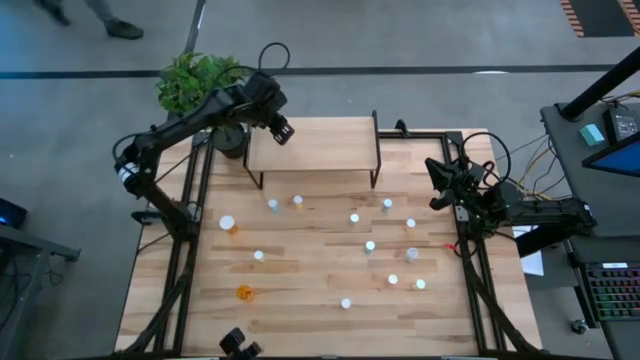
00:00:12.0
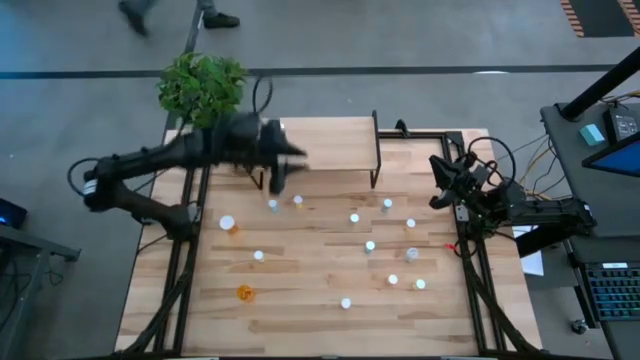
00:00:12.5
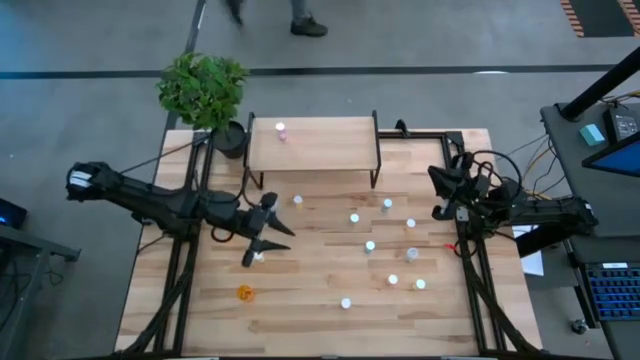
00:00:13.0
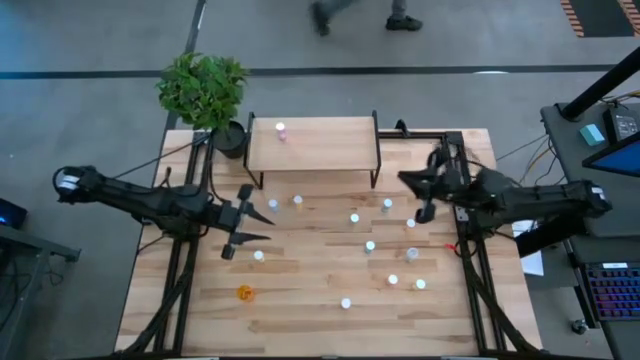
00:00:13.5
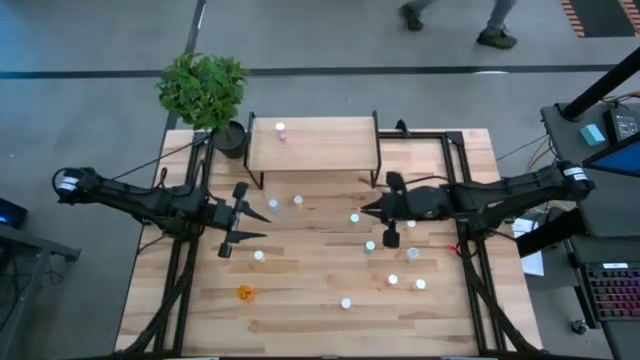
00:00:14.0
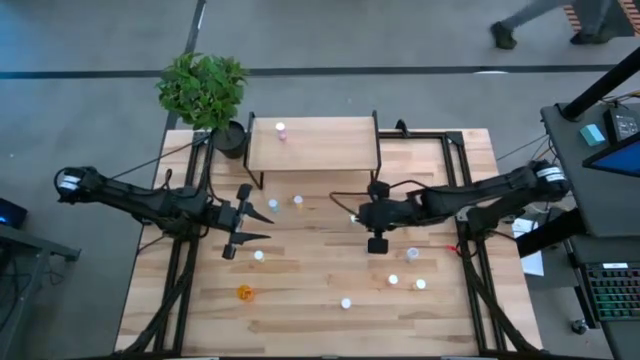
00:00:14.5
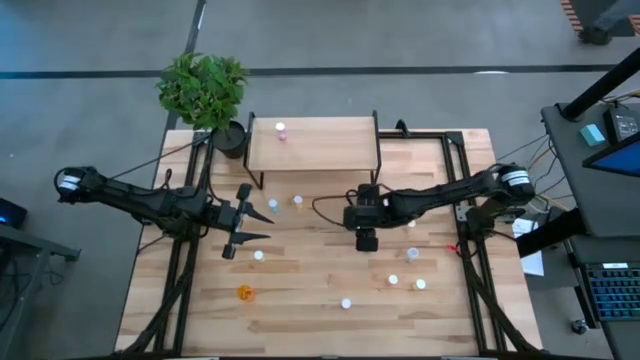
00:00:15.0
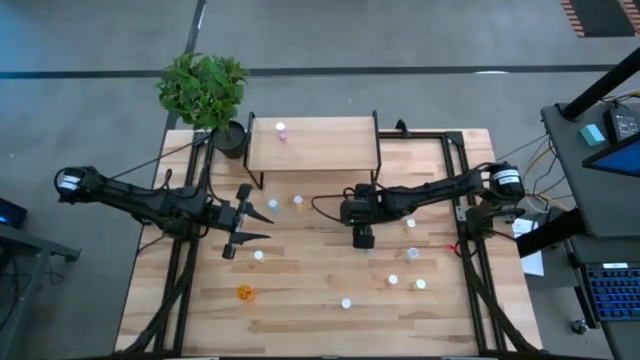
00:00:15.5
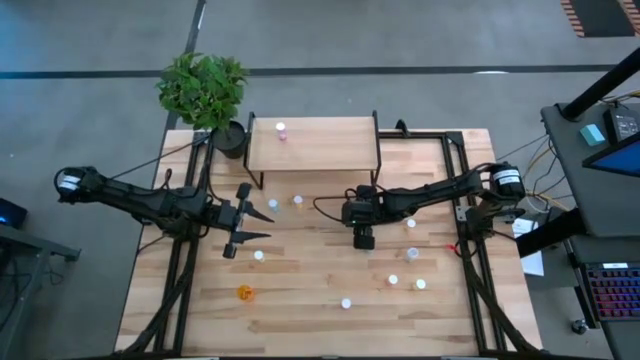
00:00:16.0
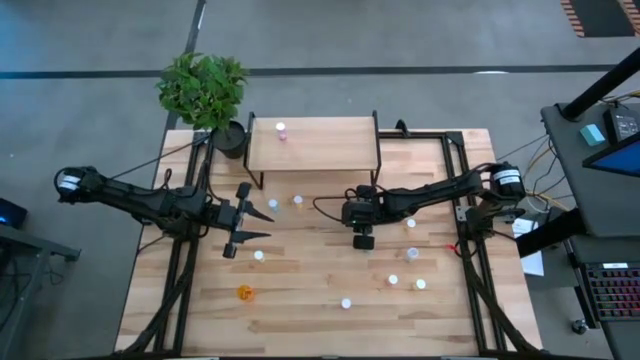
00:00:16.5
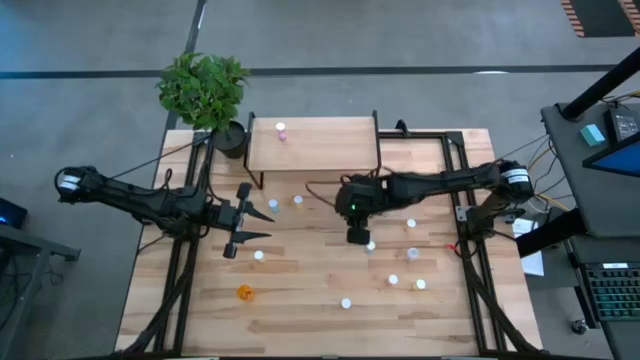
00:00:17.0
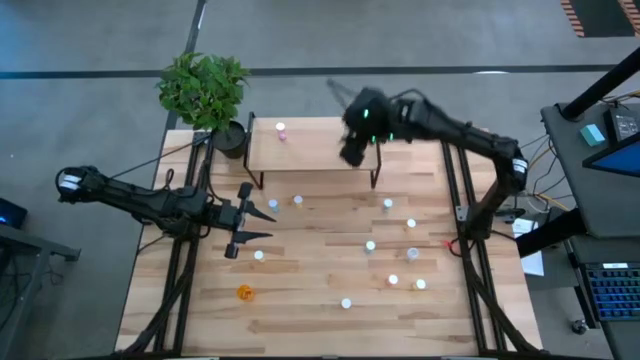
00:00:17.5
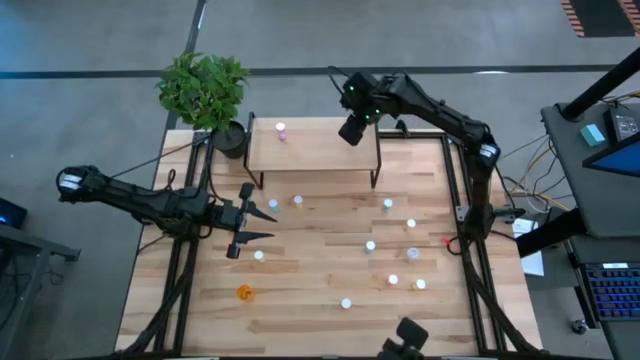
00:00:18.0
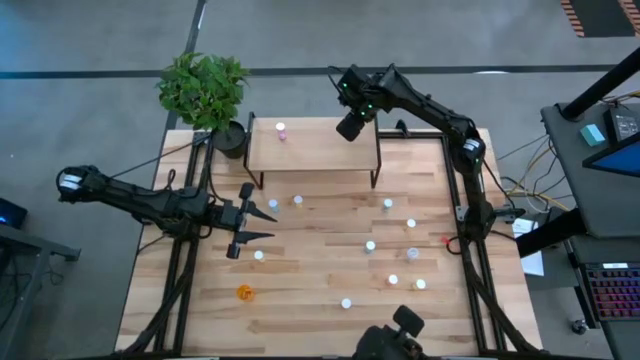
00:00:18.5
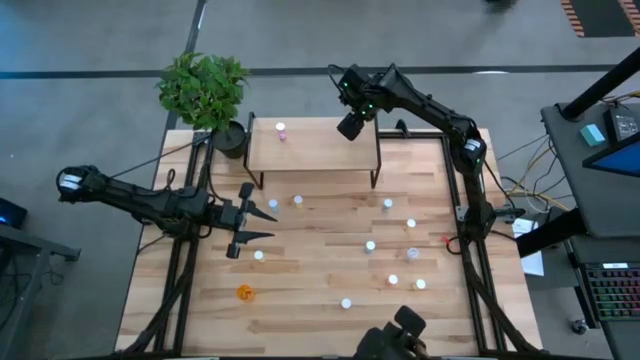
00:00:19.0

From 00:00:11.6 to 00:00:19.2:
Task: Pick and place medicine bottles onto shelf by color
Put the yellow pill bottle on the shelf

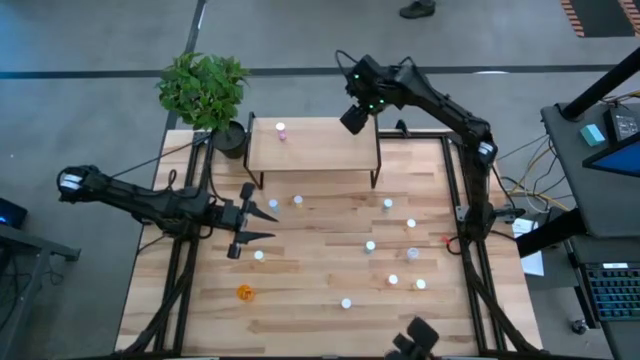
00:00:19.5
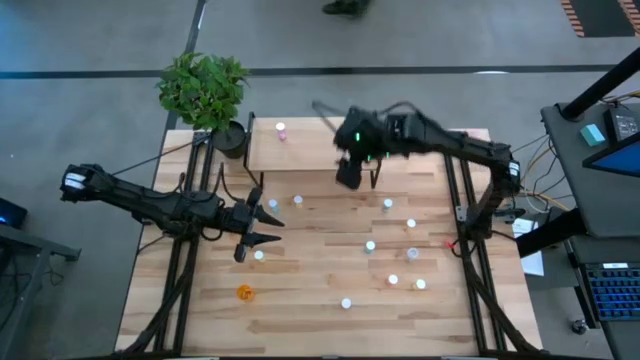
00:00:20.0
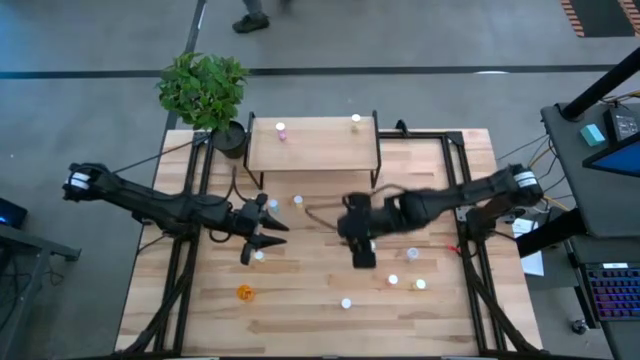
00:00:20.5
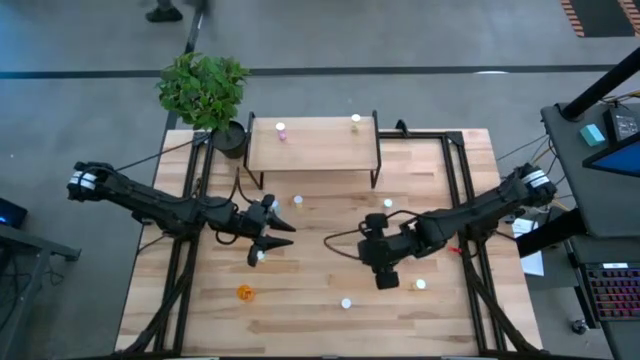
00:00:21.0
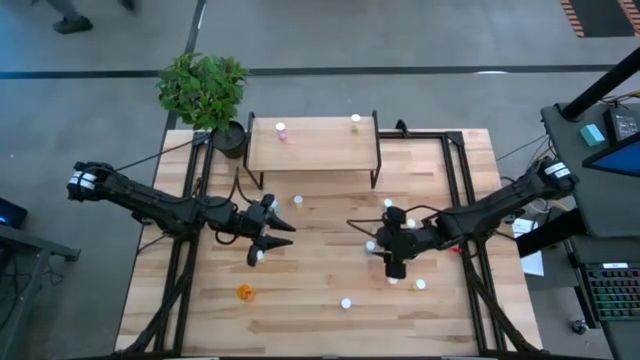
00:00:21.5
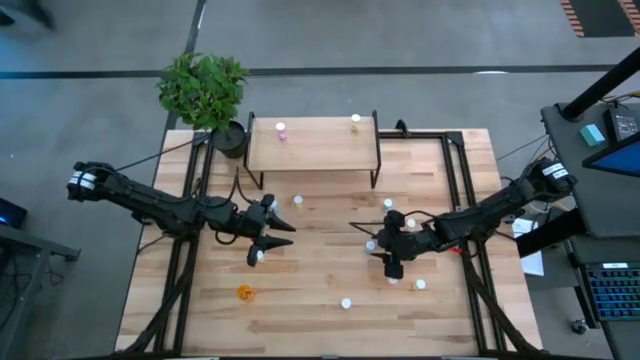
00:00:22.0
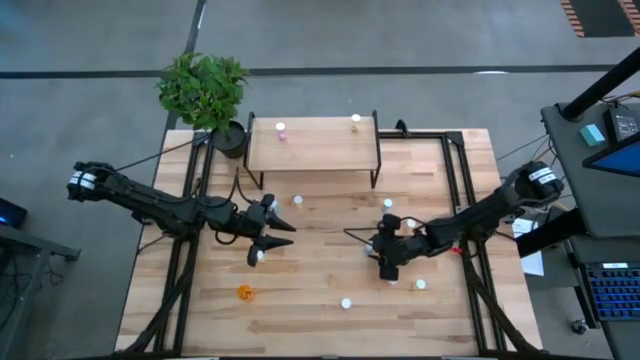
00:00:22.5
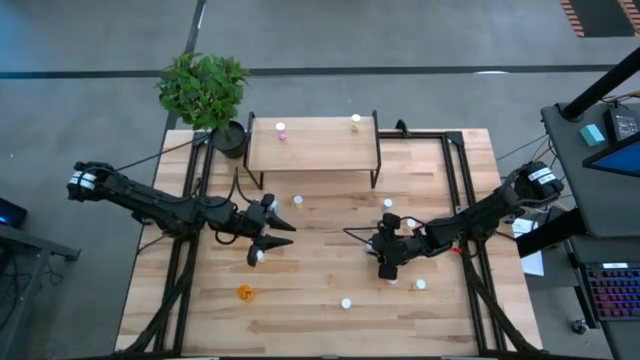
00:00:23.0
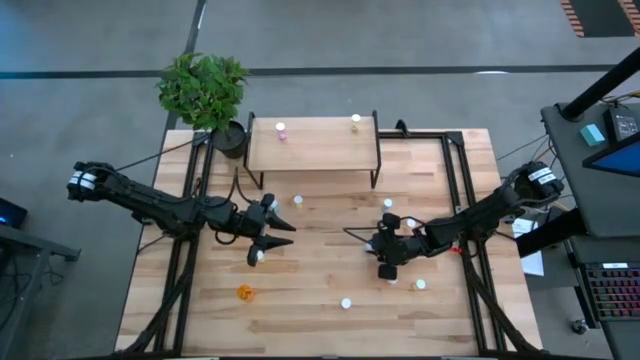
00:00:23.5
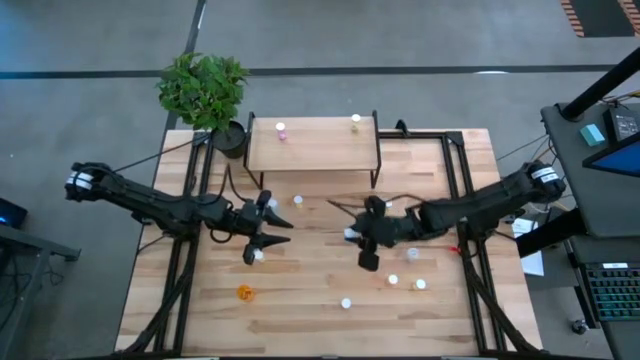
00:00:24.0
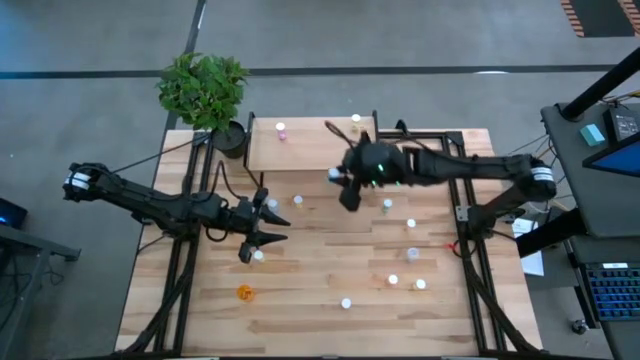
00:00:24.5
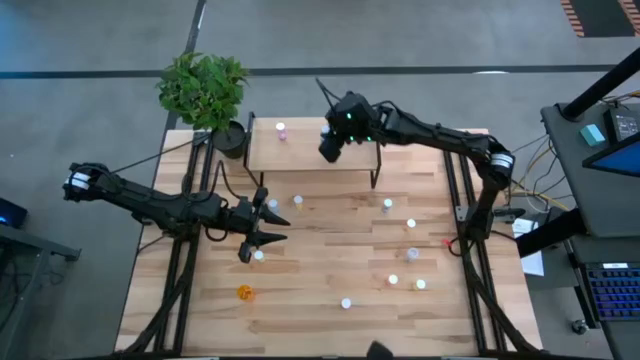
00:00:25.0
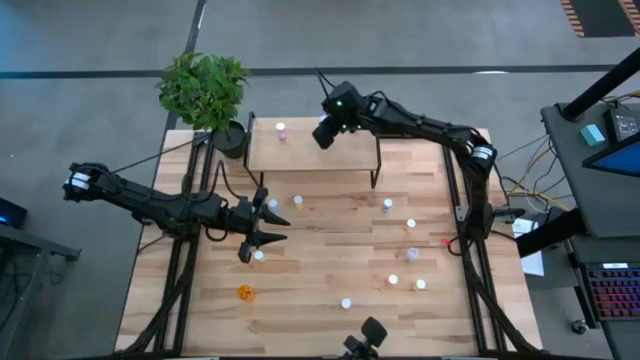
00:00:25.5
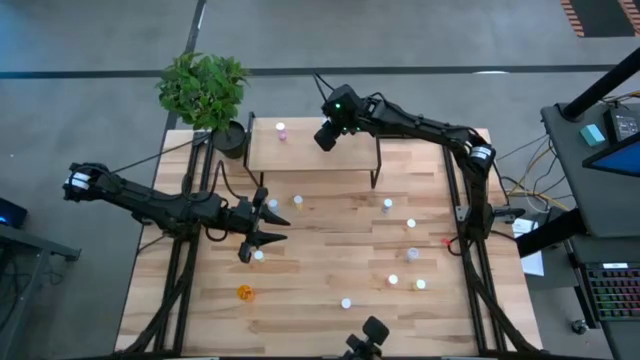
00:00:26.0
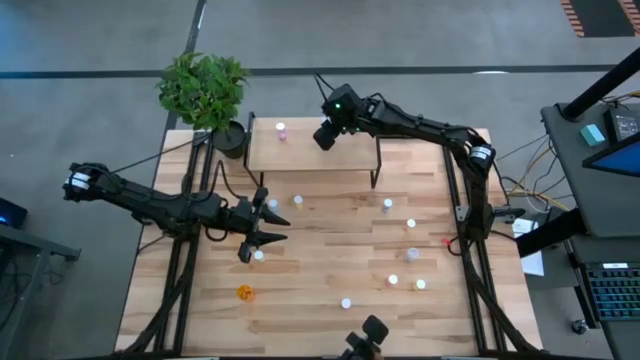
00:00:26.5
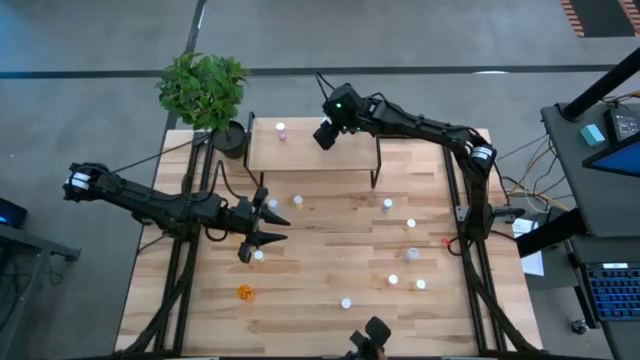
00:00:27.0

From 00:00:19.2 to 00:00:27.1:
Put the blue pill bottle on the shelf

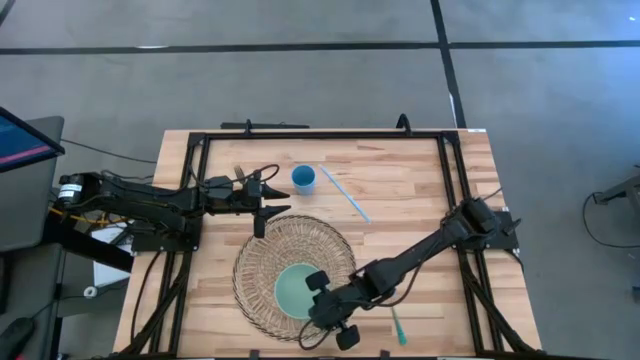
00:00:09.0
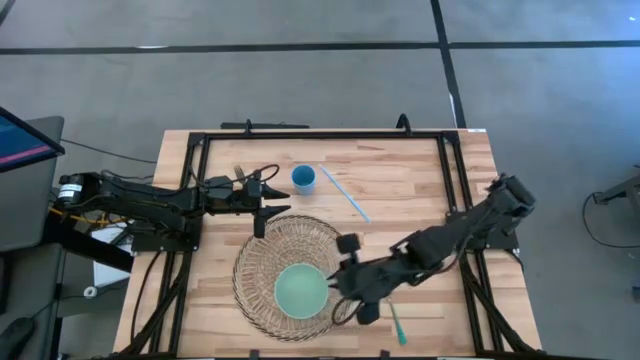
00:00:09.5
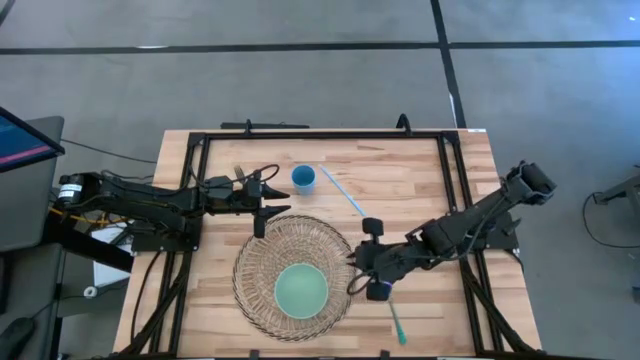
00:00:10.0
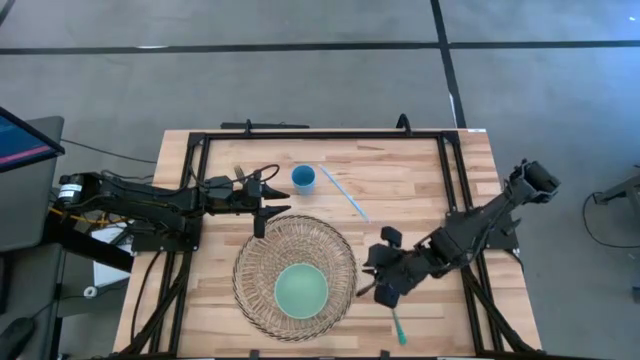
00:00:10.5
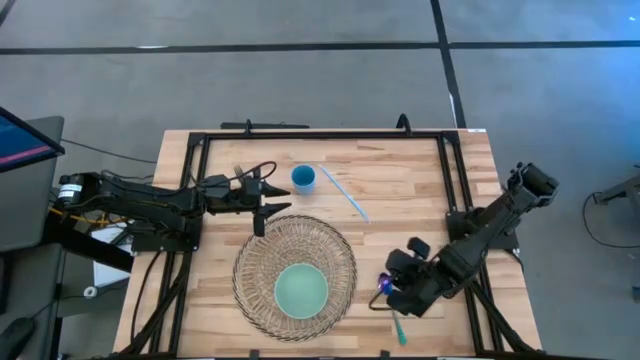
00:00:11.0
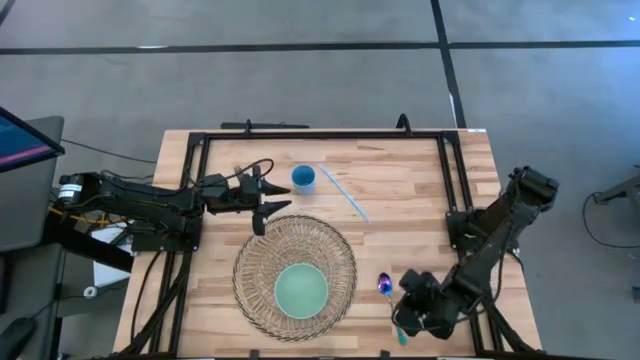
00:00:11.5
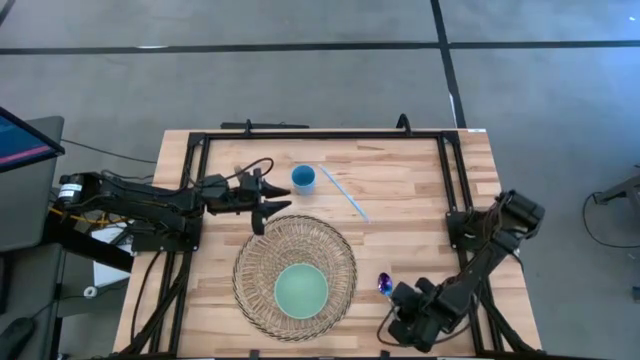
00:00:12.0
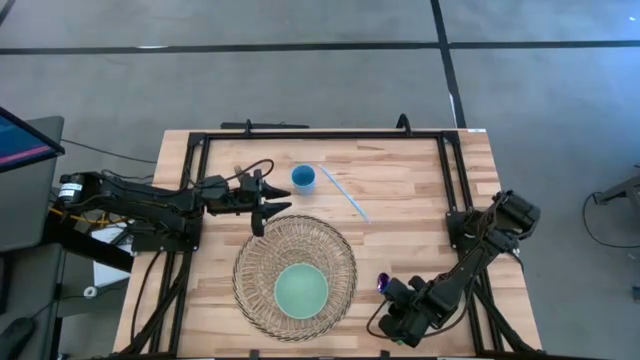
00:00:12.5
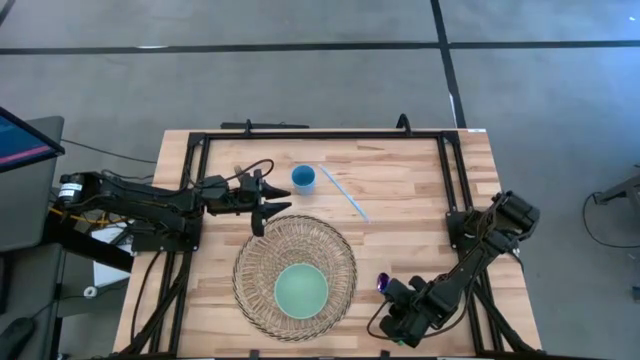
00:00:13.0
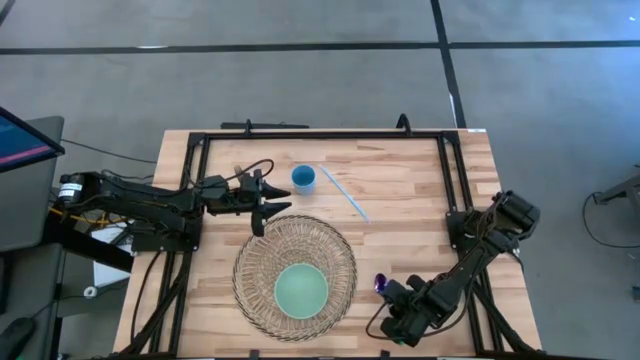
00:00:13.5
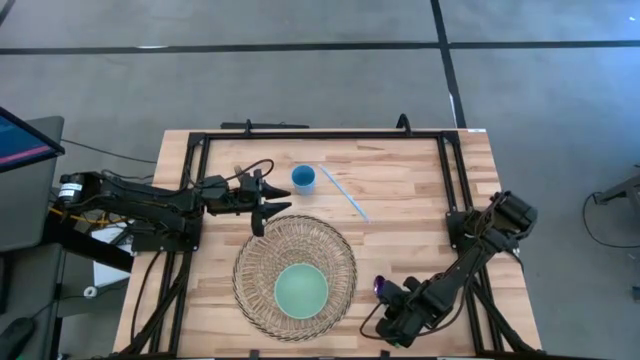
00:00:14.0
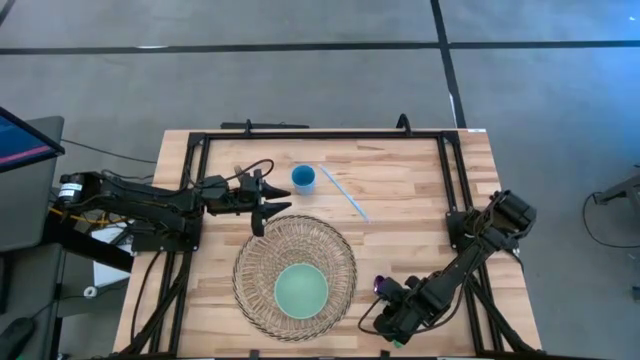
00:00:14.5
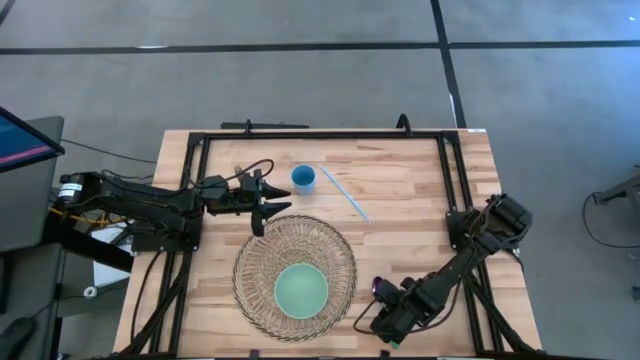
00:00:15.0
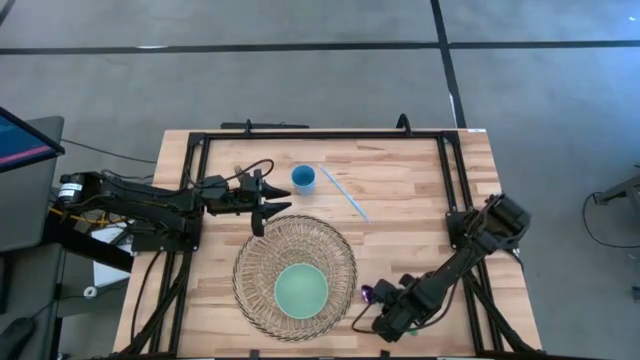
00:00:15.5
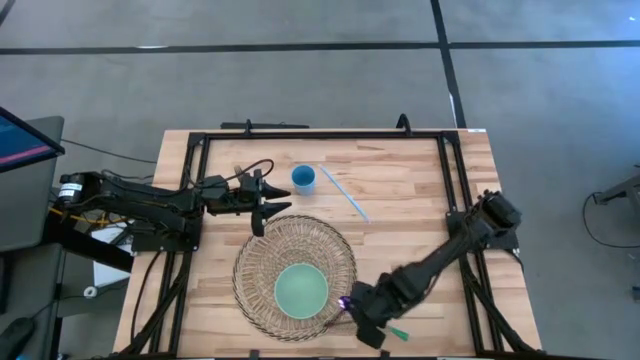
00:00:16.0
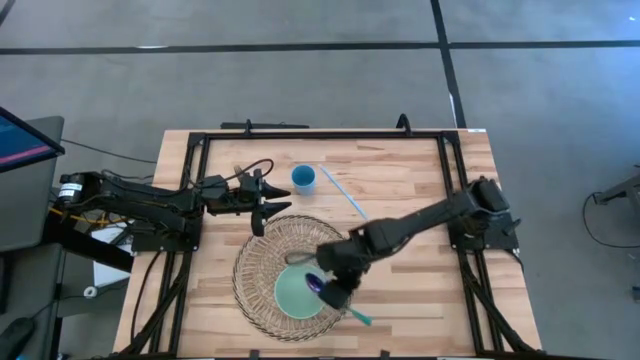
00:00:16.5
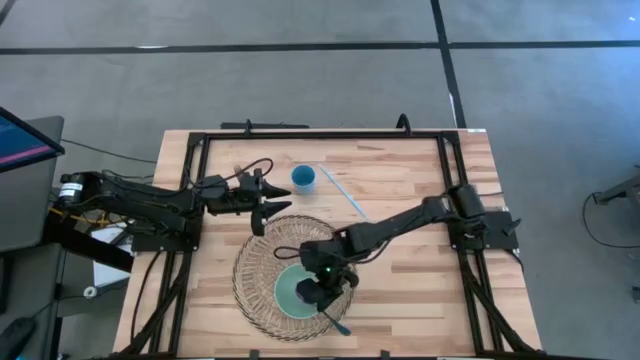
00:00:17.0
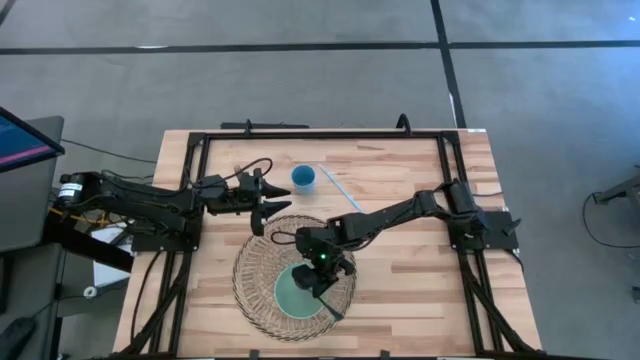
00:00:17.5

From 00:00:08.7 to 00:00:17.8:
Task: Pick & Place Utensil
Put the blue spoon into the green bowl on the woven placemat
